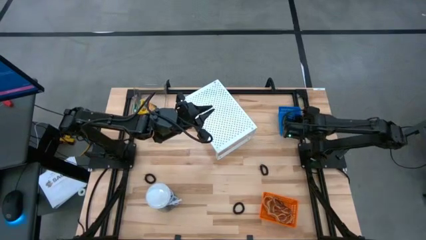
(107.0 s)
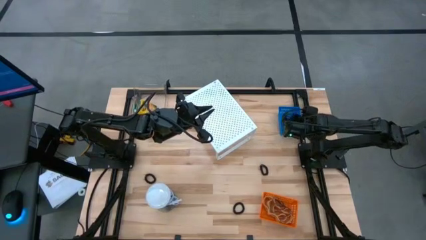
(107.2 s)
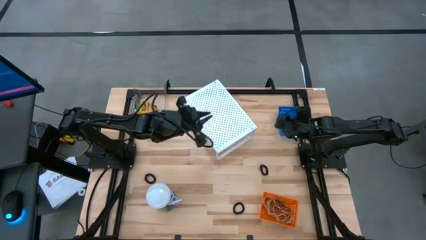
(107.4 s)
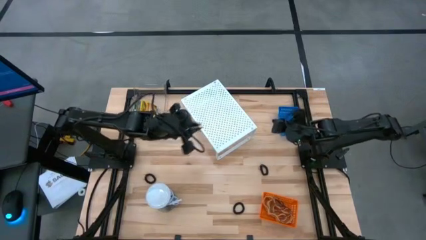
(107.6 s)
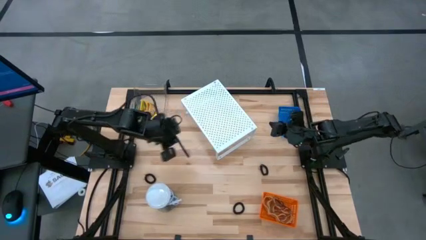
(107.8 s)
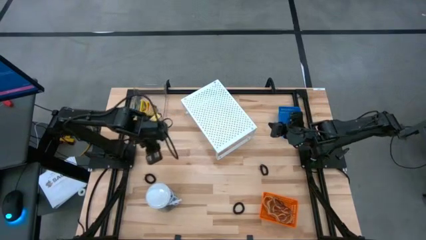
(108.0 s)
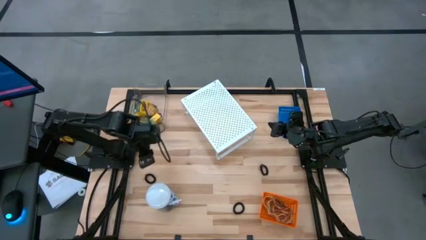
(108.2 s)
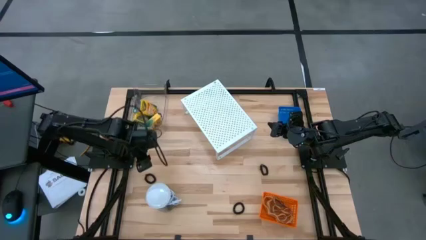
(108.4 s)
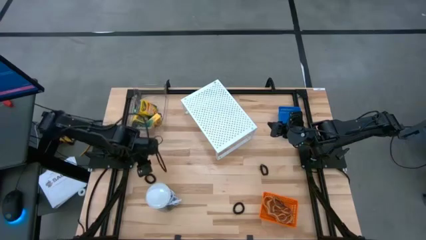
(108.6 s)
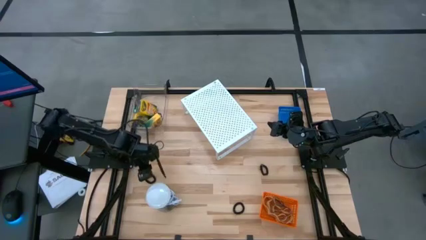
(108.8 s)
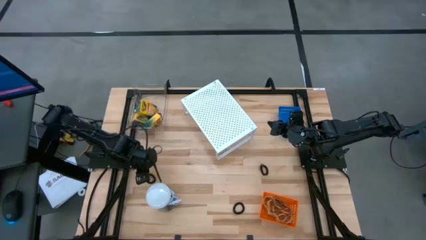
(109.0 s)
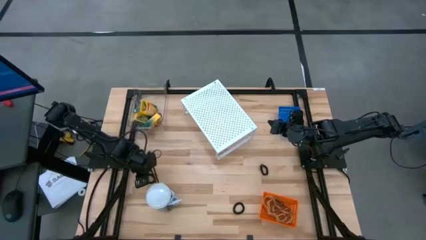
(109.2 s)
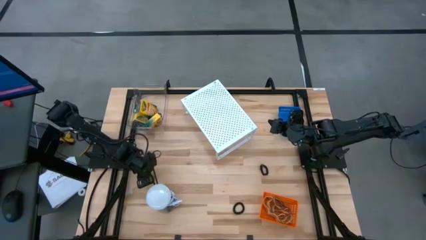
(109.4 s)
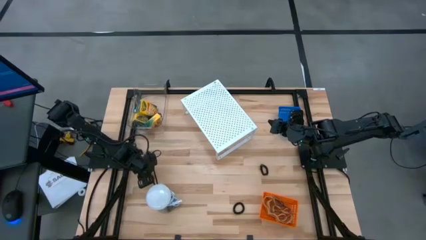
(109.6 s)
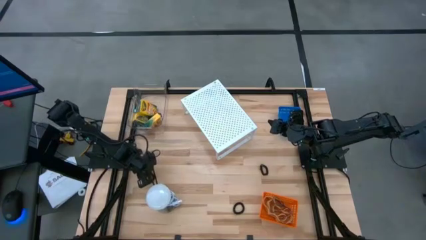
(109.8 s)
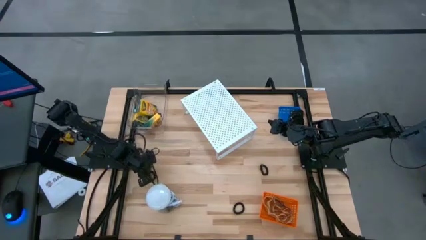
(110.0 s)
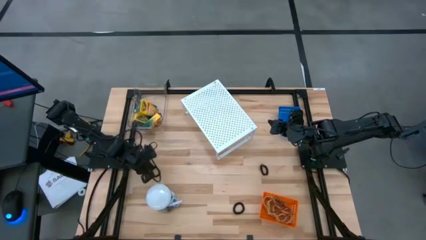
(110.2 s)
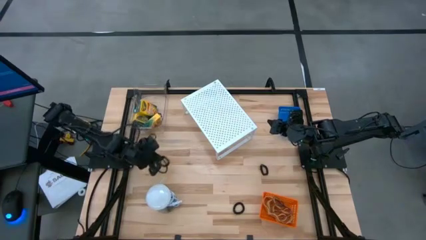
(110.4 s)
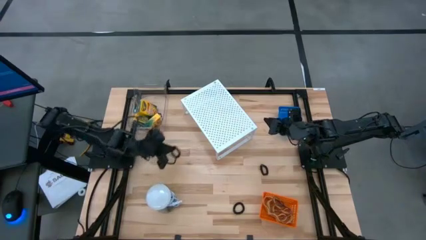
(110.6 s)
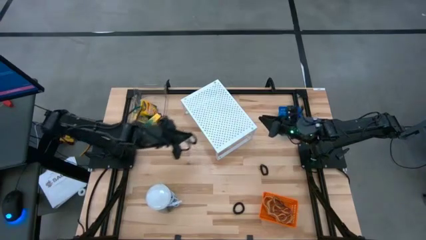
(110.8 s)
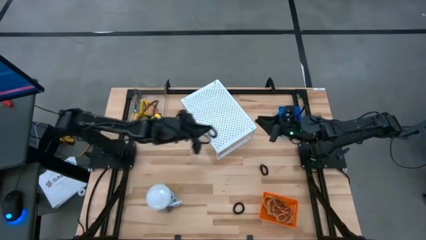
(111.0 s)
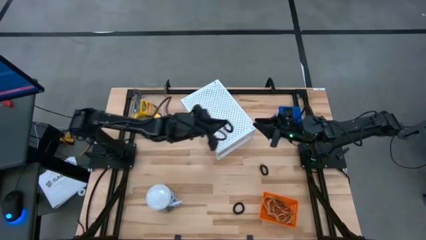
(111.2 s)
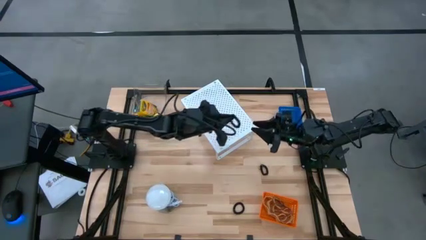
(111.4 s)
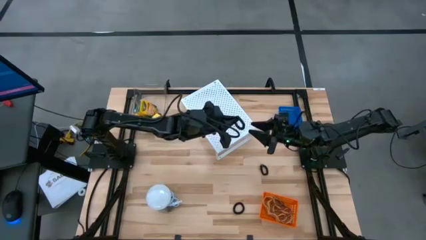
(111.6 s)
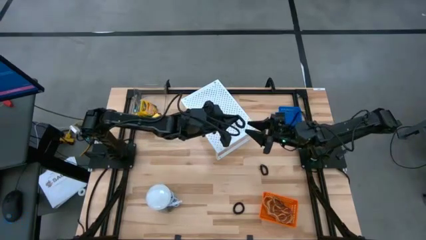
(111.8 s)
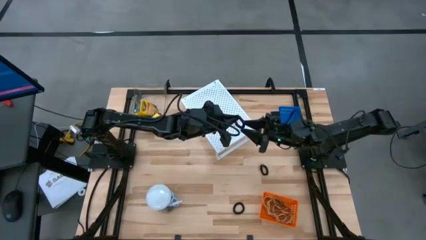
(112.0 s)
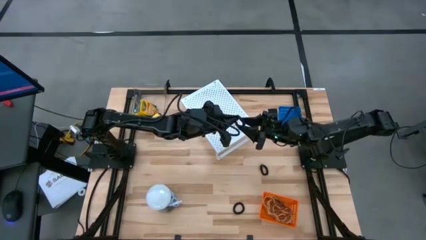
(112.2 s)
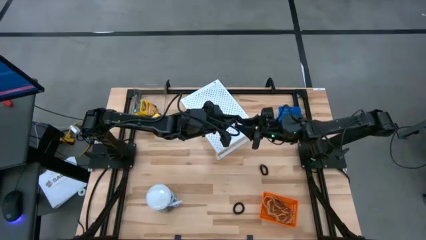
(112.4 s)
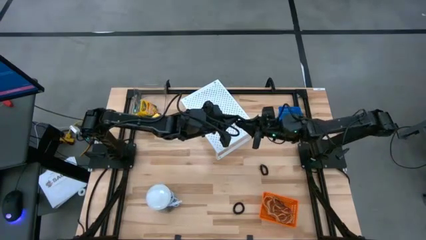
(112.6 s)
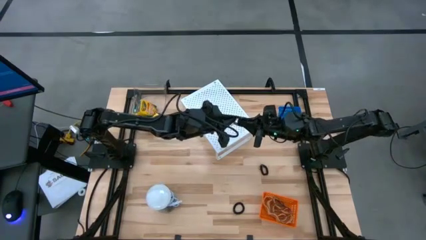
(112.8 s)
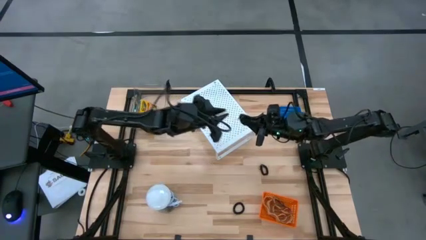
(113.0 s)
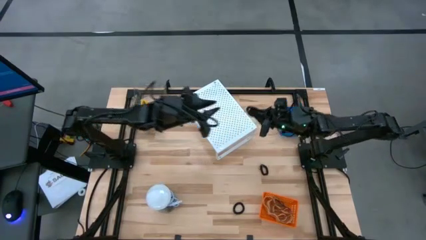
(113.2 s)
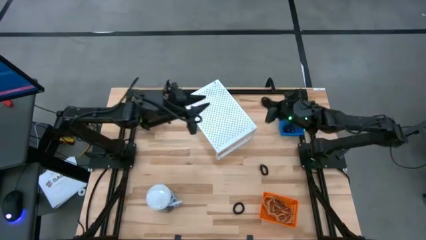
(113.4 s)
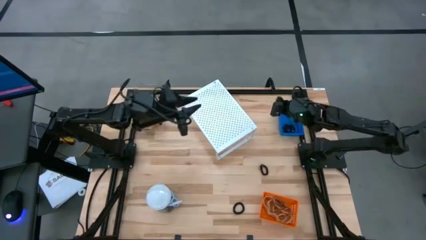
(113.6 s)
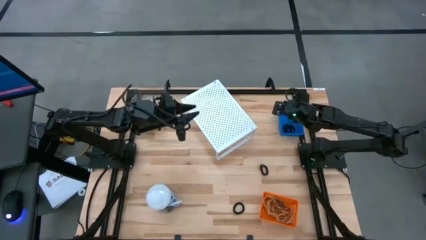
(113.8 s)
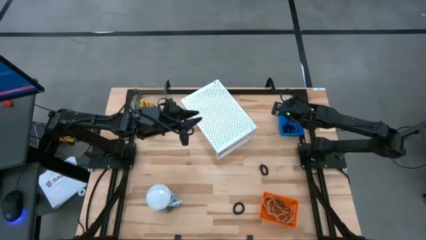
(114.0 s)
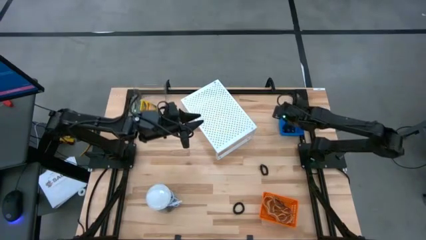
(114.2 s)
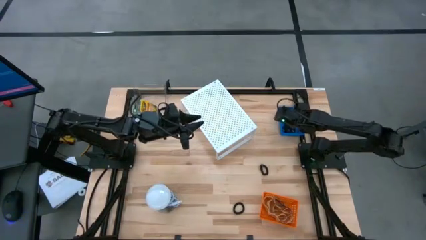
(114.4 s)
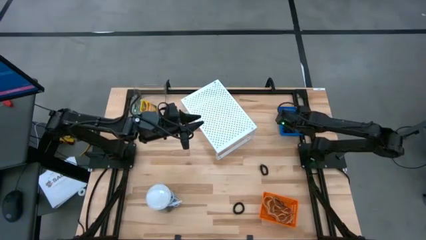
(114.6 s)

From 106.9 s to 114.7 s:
Task: Pick & Place Office Desk Supplies
Put the black spring keychain into the blue bin

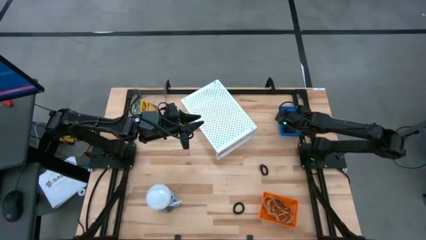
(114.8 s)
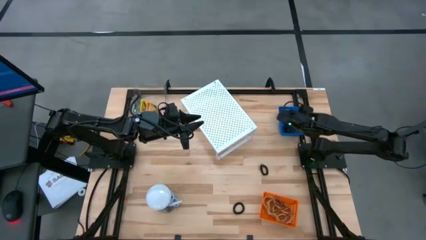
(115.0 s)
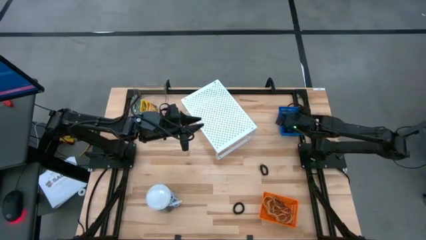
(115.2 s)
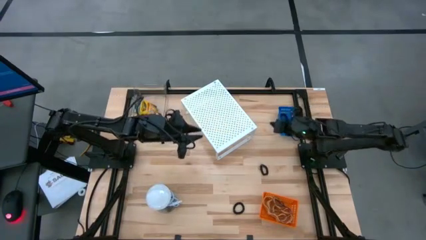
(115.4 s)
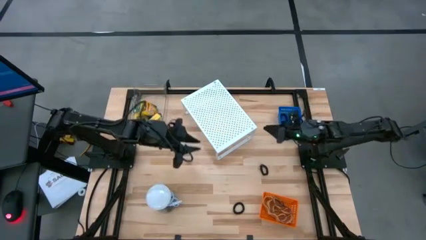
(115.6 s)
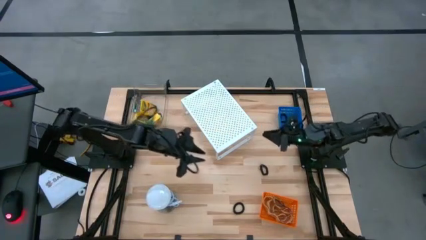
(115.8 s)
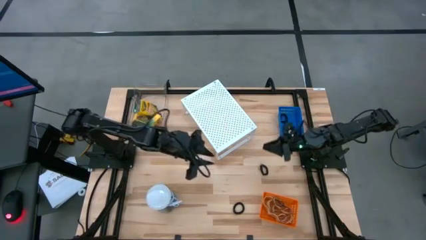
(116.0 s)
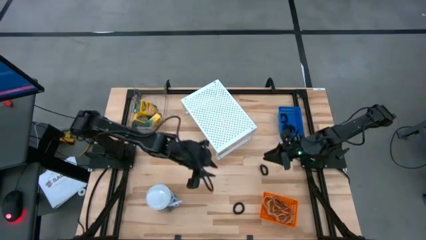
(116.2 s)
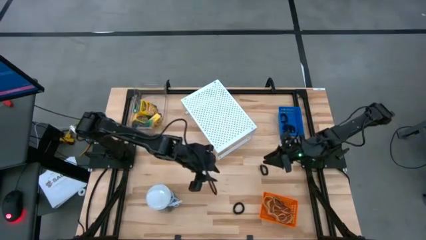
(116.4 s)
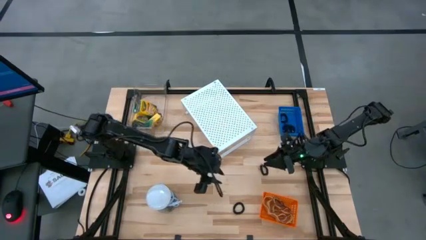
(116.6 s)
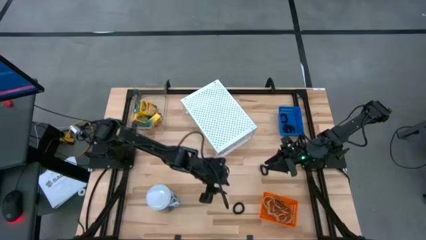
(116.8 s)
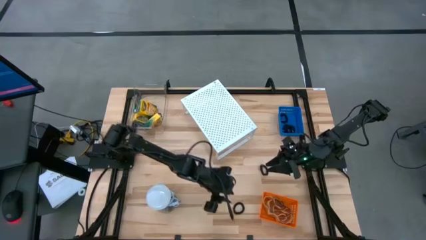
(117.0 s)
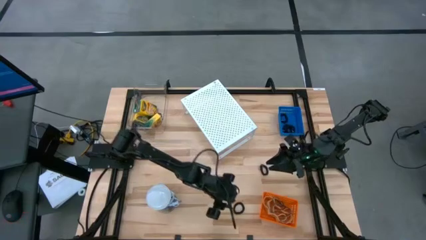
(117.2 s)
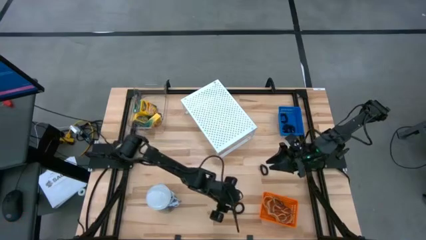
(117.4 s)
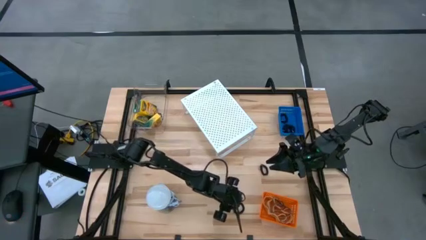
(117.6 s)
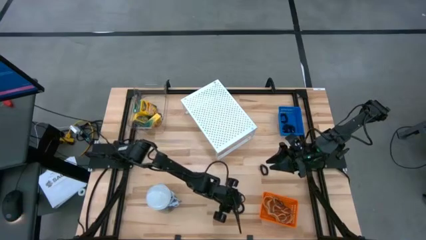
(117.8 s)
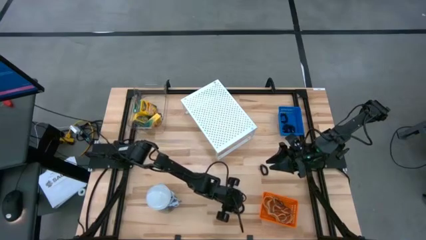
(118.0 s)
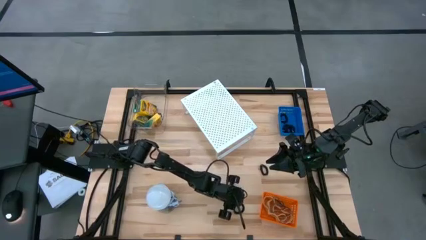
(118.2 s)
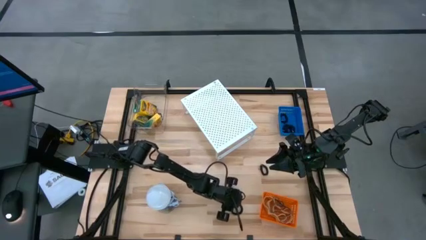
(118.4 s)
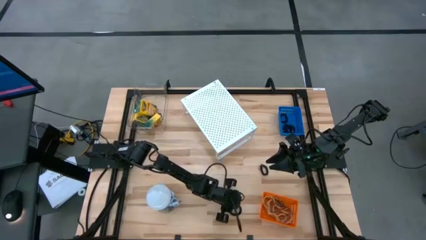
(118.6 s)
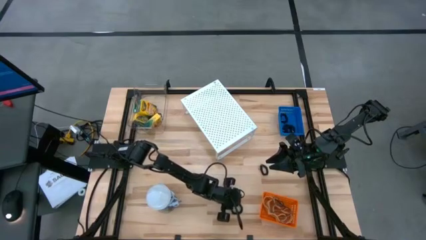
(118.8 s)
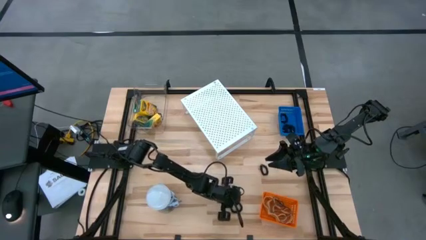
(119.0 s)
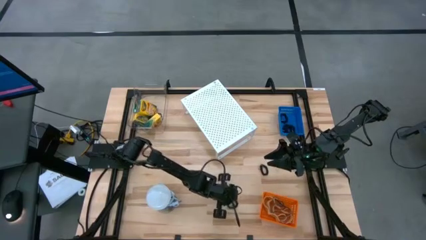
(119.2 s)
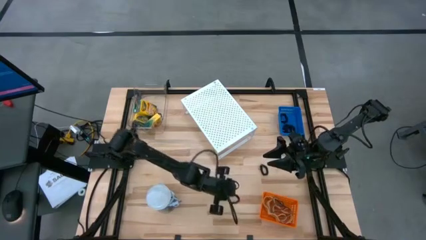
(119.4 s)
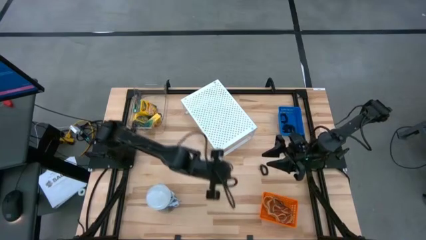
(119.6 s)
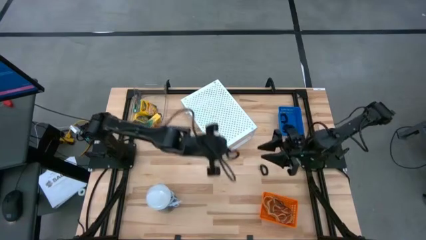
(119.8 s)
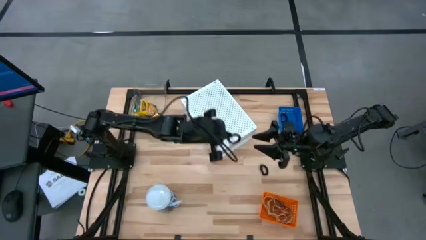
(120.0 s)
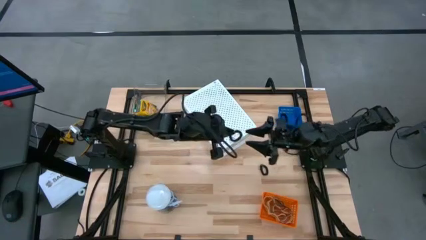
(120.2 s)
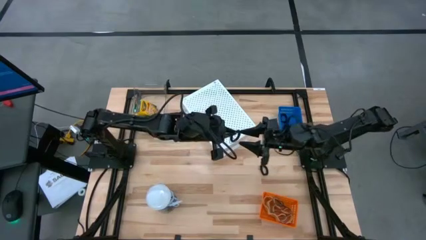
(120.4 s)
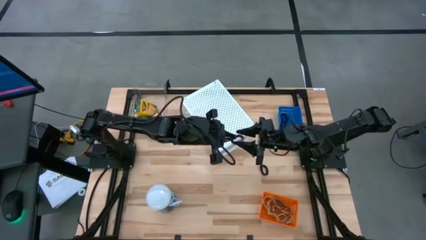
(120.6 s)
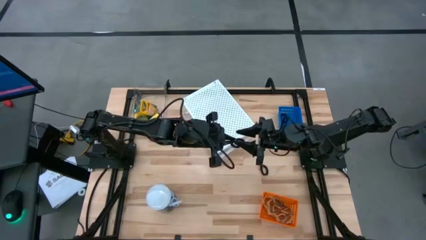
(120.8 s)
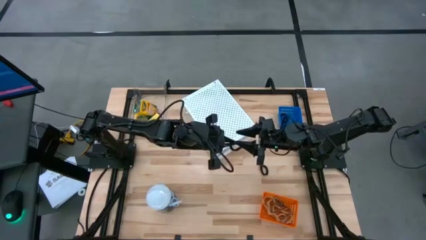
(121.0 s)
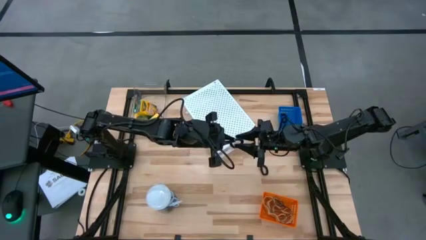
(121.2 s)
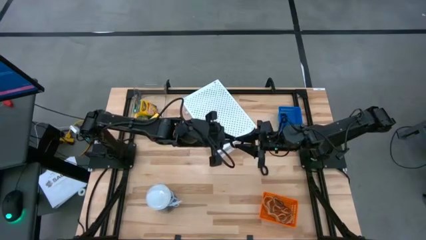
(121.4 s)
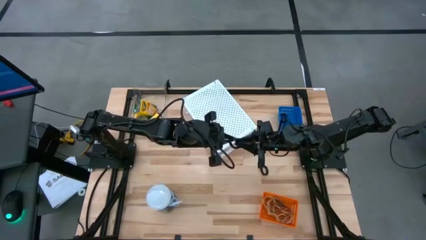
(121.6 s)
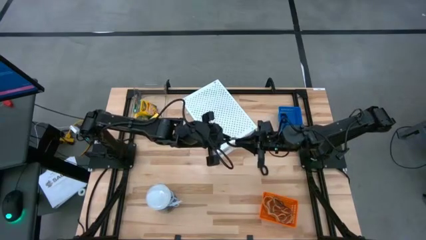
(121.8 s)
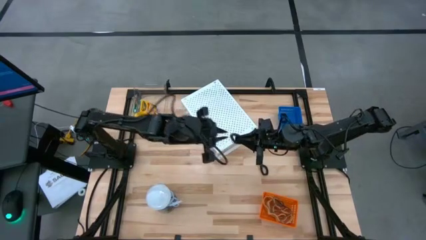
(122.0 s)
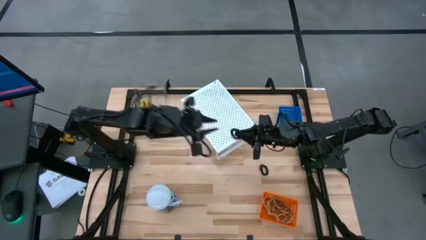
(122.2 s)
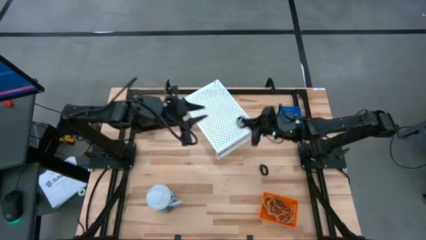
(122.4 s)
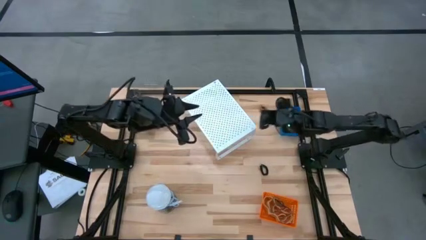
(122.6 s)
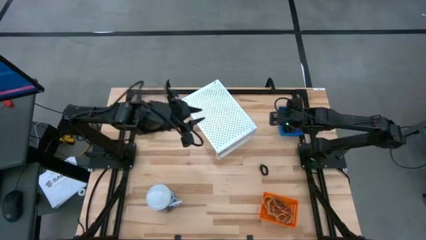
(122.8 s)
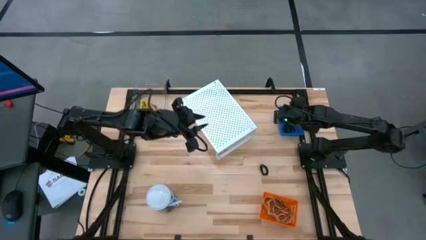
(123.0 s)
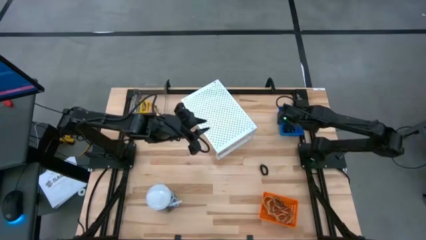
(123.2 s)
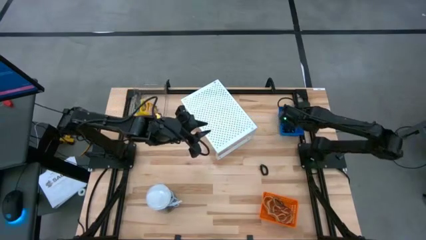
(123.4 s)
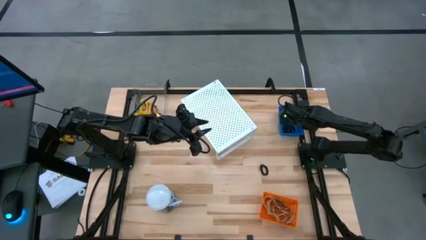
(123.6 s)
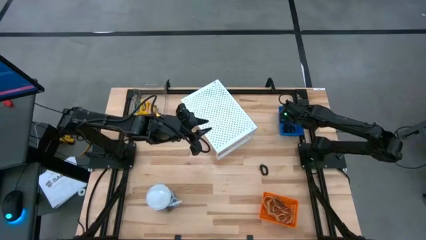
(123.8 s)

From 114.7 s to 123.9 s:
Put the black spring keychain into the blue bin
